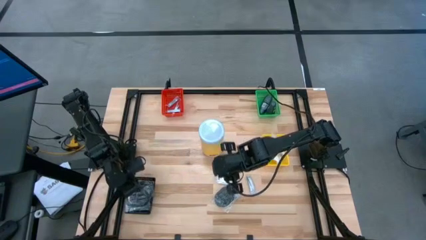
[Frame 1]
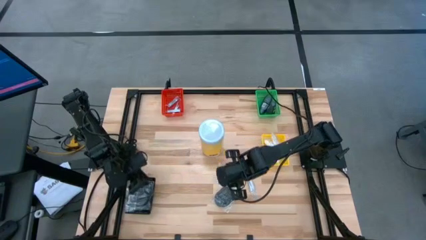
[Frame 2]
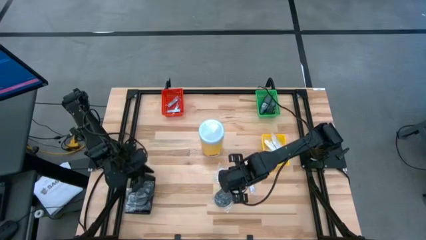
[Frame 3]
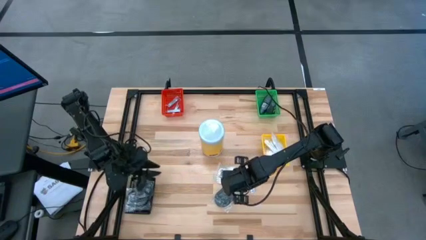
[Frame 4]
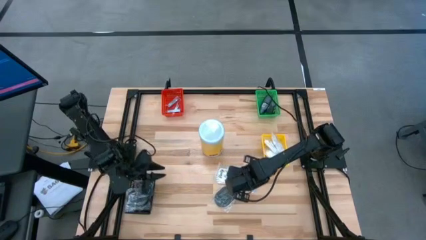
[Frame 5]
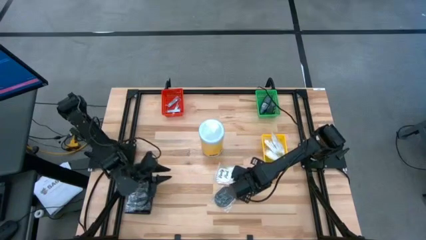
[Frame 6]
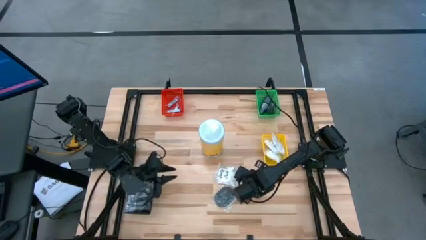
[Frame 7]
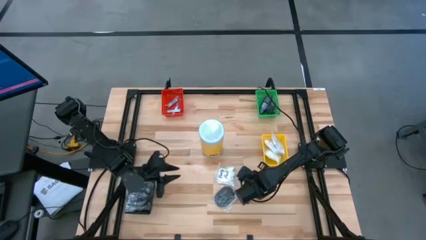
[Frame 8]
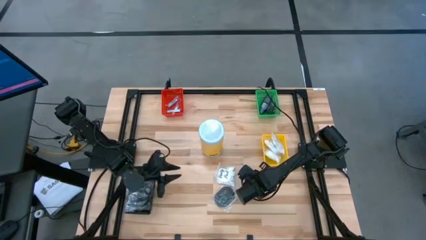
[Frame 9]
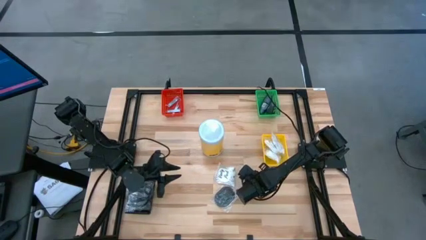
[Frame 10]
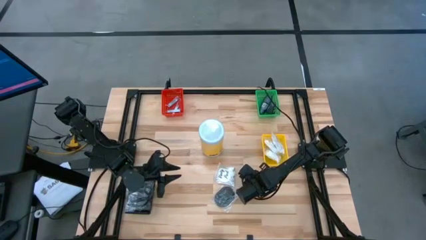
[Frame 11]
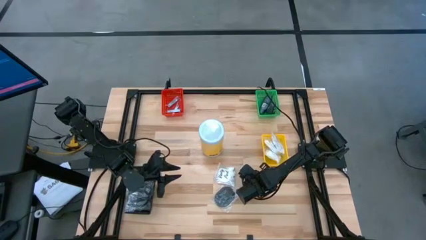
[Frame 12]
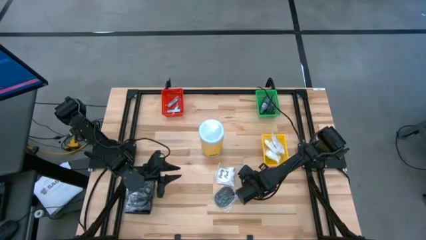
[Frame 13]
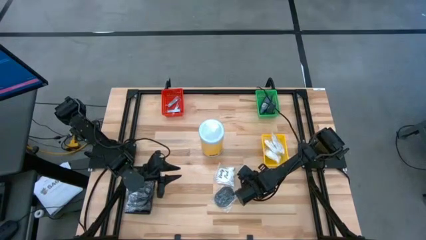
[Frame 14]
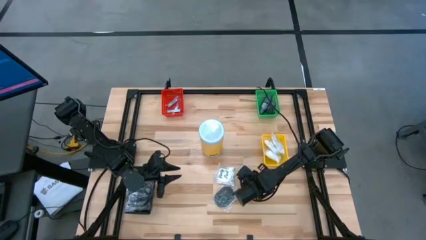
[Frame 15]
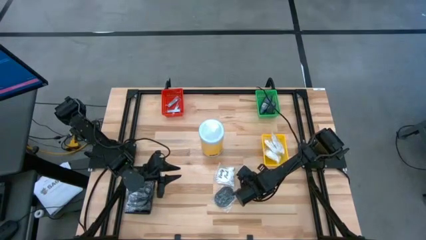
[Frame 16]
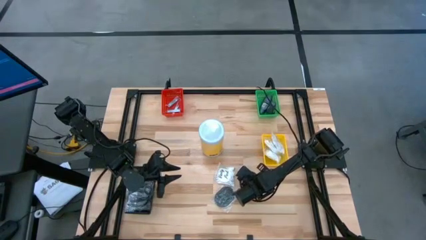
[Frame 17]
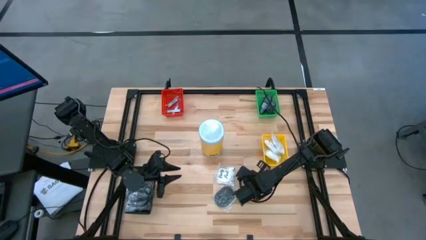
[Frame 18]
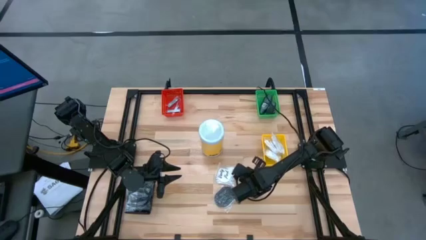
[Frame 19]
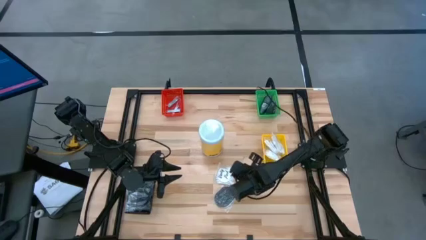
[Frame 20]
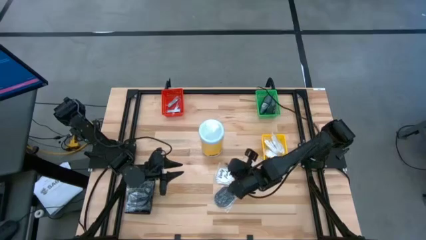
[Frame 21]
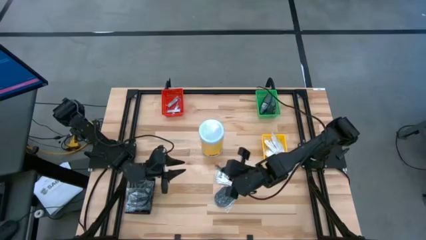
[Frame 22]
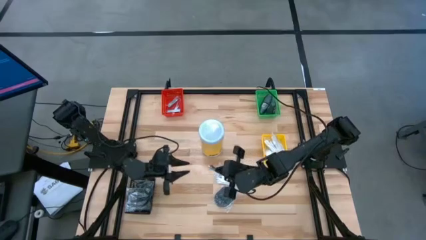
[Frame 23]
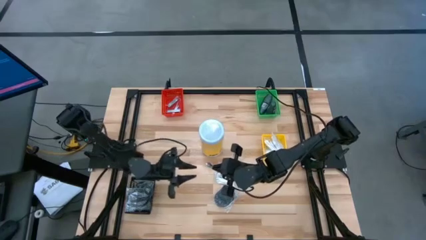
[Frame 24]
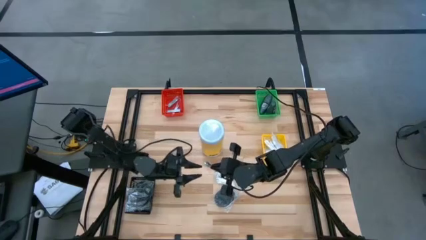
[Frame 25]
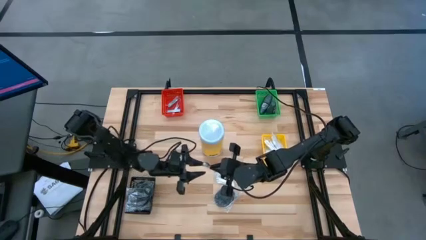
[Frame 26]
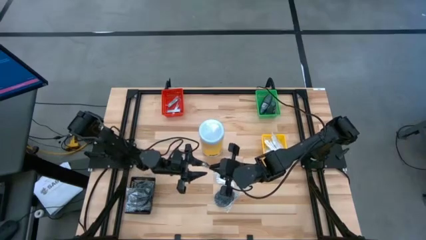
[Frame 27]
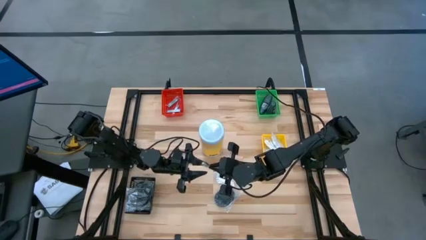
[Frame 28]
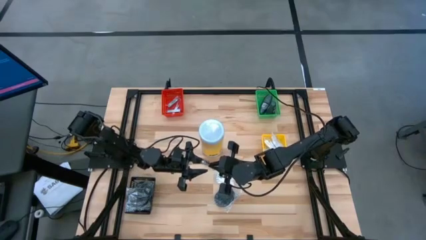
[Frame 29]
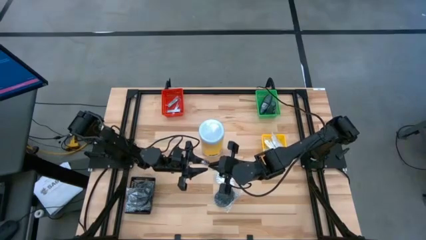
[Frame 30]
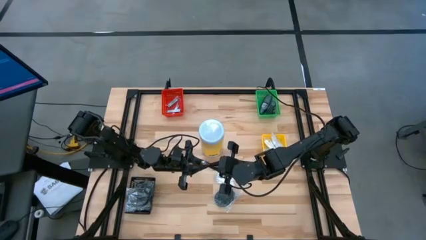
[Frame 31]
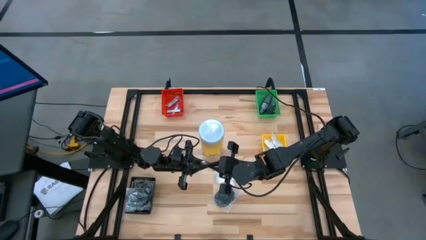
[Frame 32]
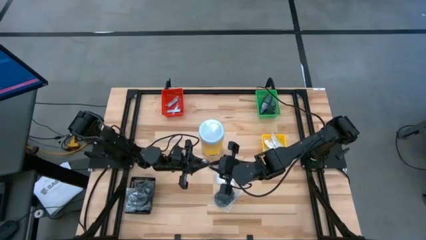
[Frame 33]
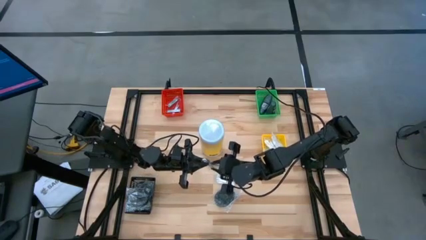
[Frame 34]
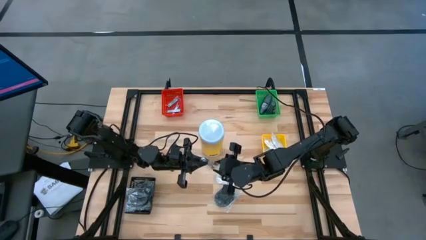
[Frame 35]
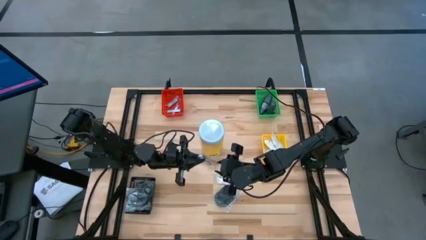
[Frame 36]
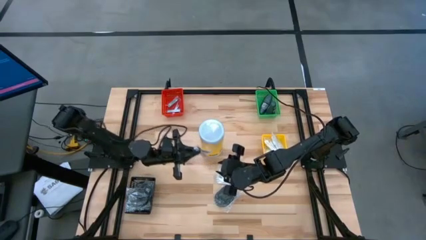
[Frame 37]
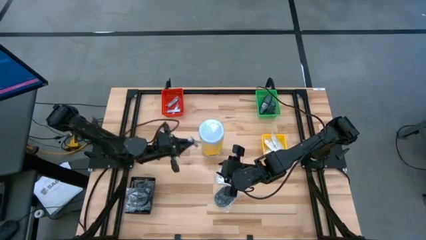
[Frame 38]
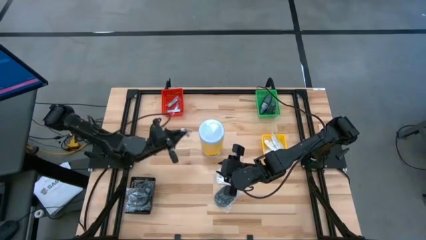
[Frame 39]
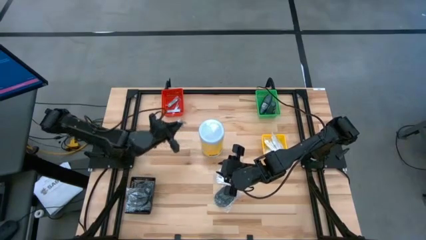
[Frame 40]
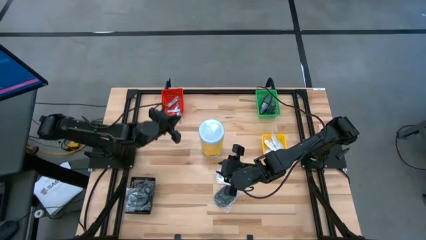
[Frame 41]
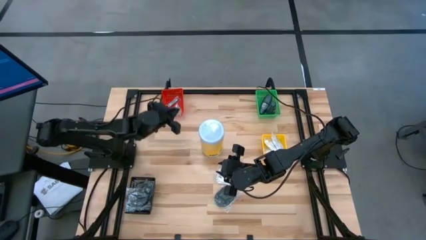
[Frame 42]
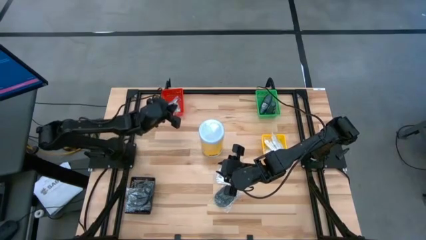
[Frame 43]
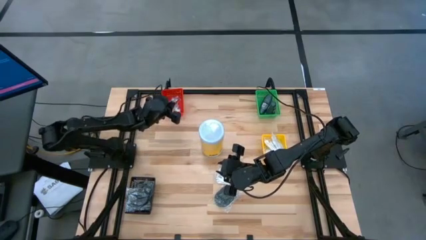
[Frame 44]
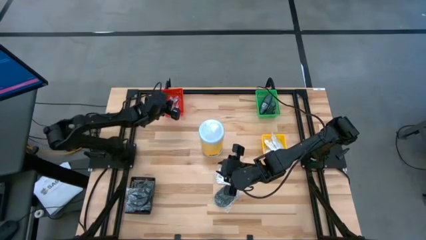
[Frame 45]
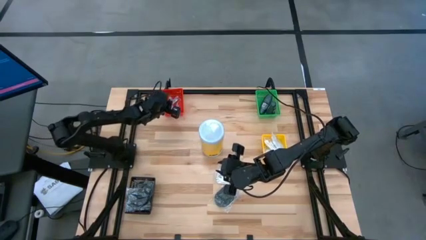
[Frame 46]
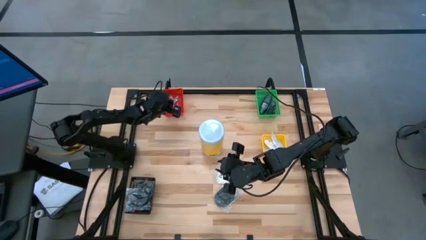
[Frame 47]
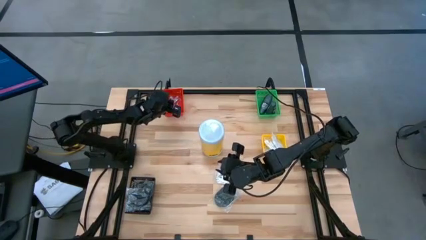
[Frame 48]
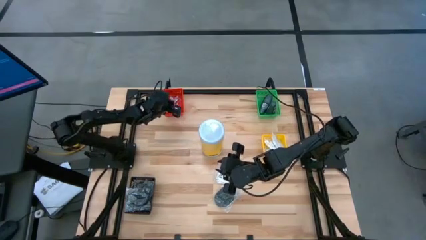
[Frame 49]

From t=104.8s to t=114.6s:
Task: Pick & Place Travel size toiletries
Put the silver nail cutter into the red bin

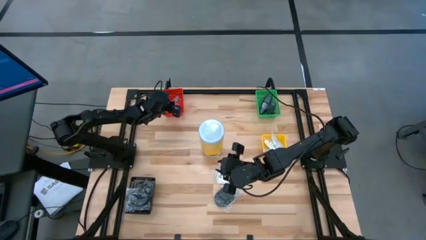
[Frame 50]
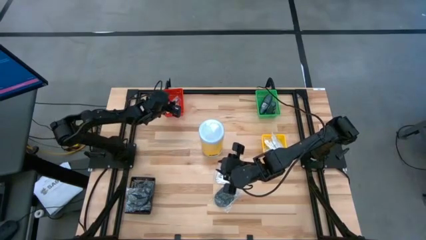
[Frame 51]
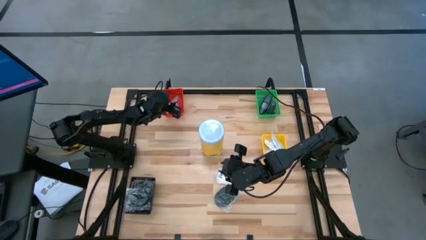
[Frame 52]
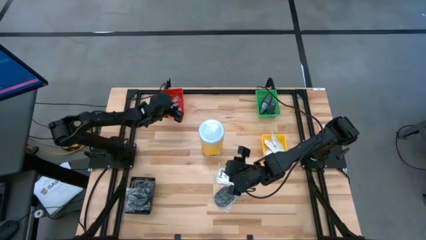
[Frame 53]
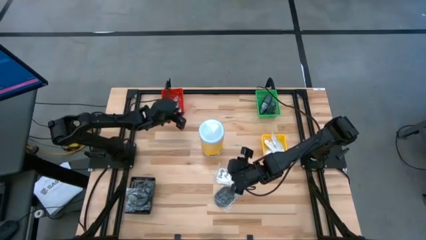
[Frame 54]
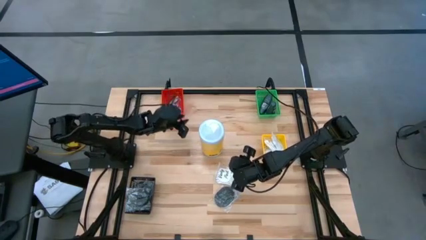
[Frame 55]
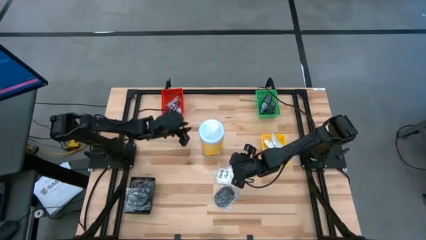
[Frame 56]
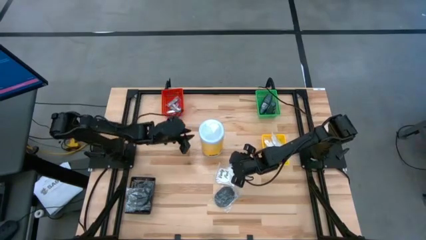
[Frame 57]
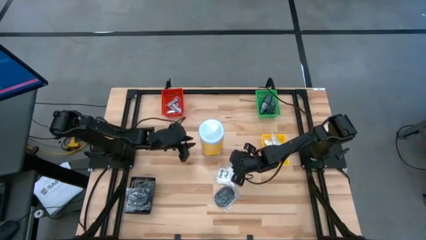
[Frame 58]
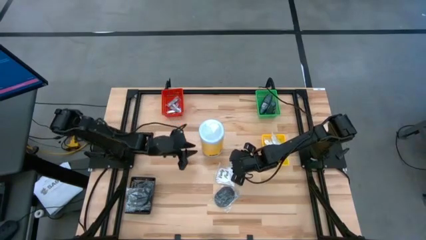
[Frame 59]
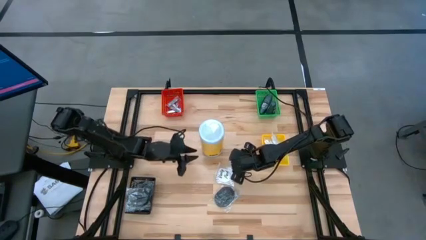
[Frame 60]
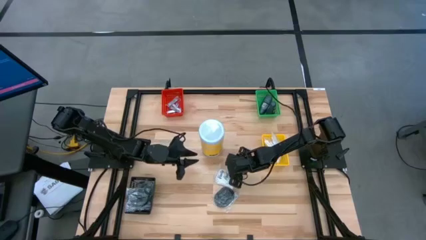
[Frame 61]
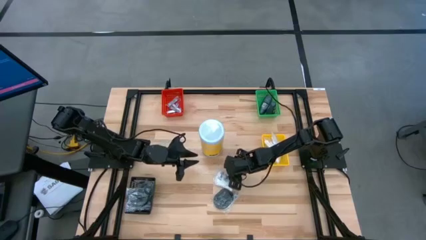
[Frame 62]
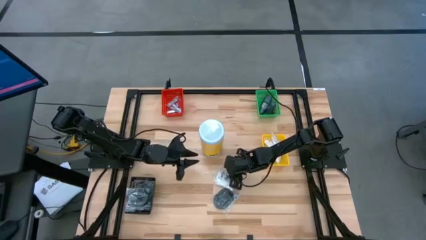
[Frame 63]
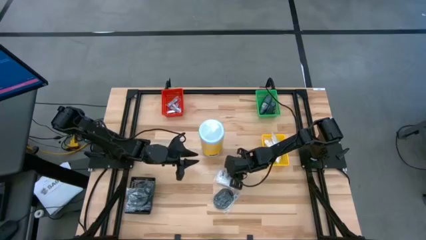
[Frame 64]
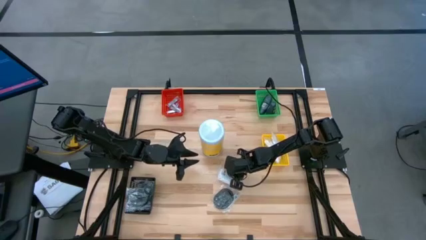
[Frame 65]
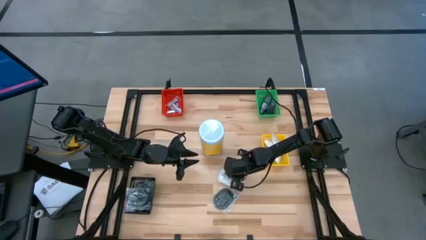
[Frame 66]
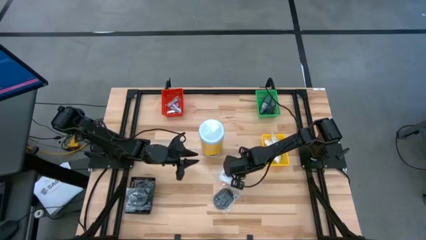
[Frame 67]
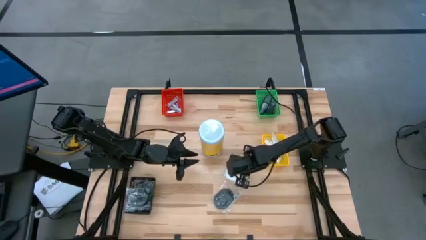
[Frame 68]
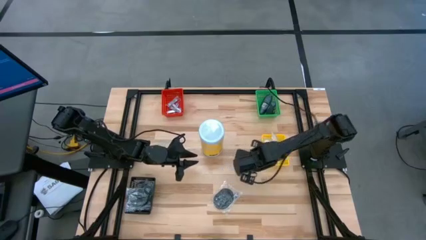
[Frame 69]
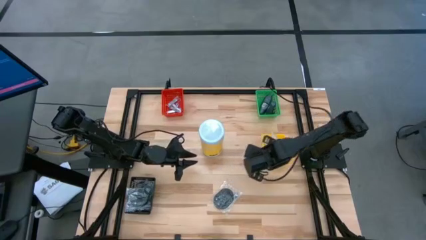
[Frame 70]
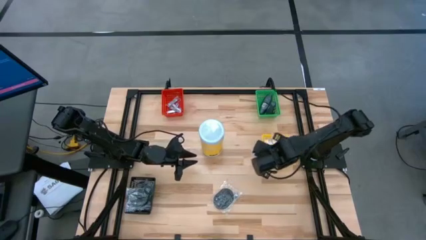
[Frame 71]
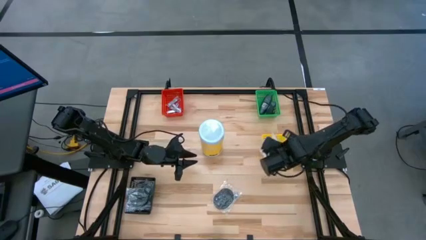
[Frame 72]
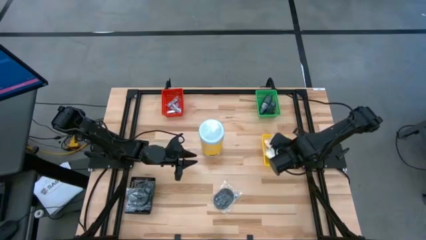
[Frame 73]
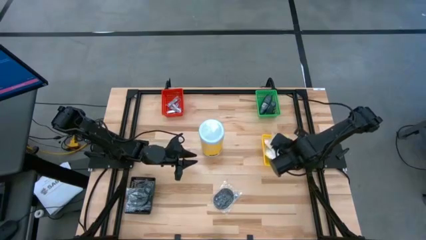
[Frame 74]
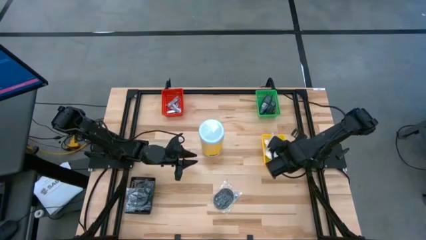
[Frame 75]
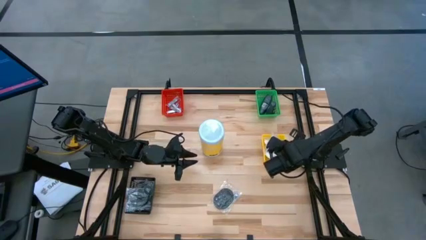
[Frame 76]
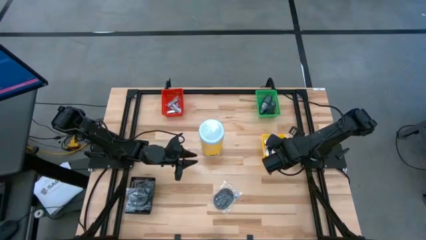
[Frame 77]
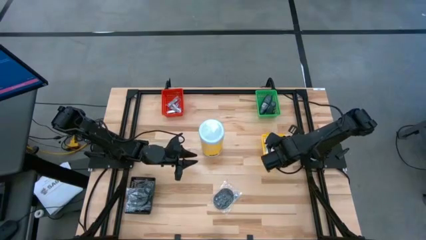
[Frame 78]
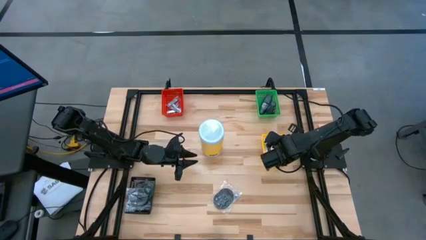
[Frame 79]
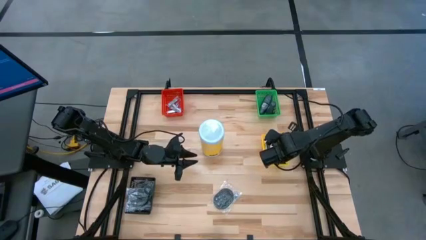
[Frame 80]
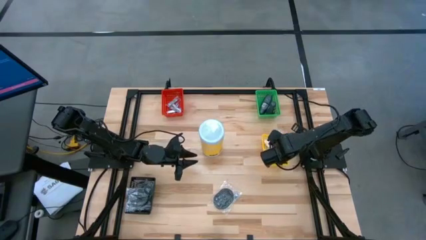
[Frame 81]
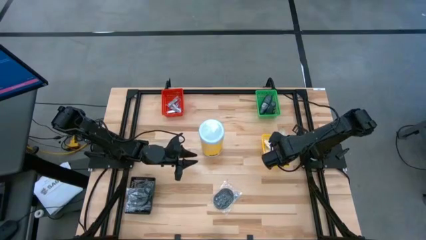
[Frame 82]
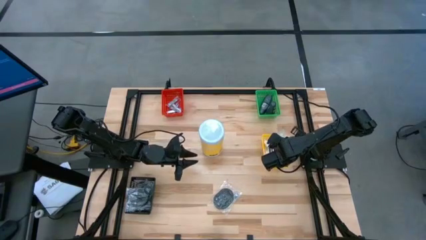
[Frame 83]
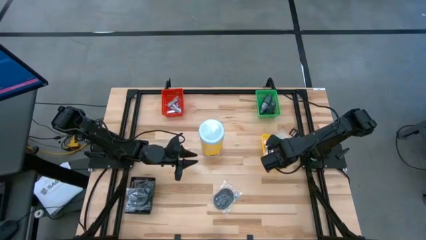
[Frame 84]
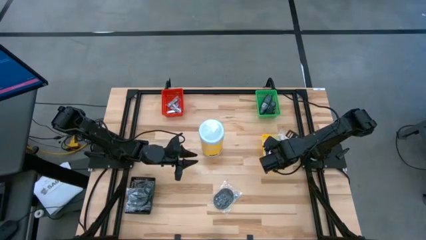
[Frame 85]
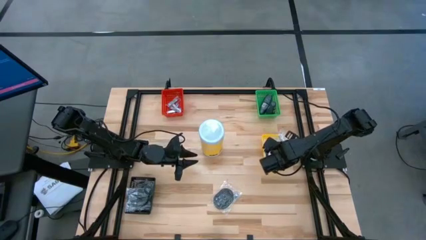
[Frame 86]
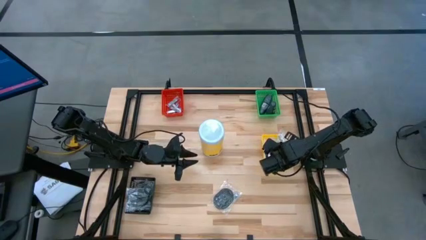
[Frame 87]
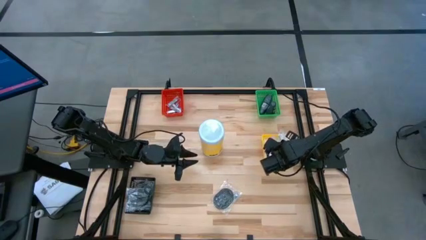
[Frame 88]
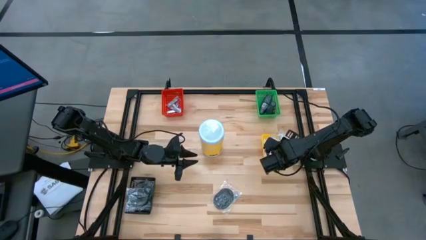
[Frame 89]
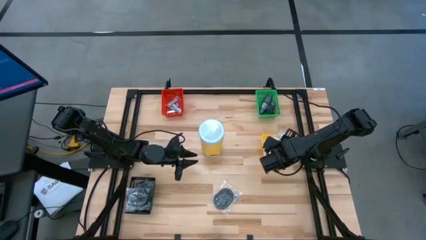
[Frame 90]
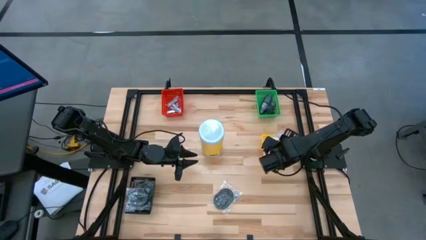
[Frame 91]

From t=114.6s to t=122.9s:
Put the white cotton pack into the yellow bin
